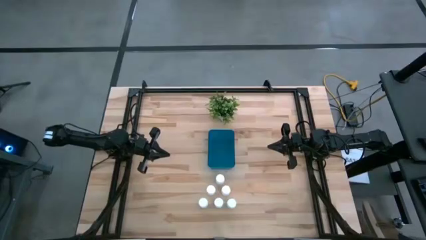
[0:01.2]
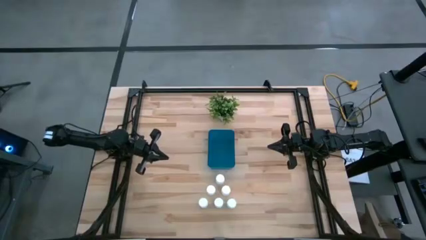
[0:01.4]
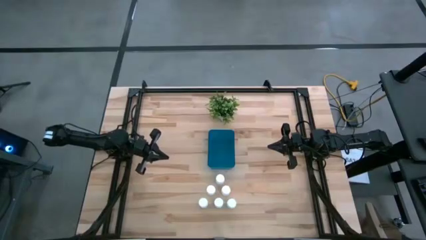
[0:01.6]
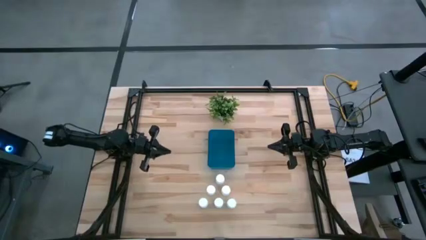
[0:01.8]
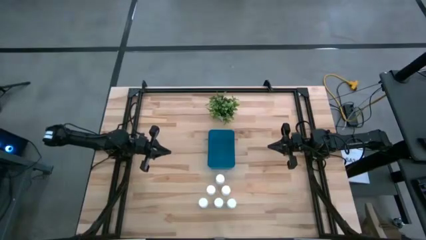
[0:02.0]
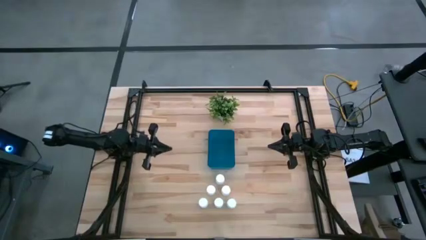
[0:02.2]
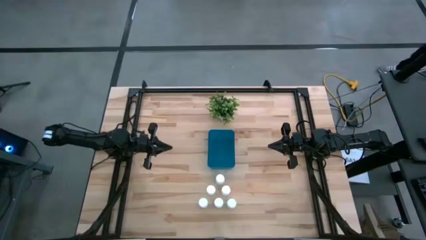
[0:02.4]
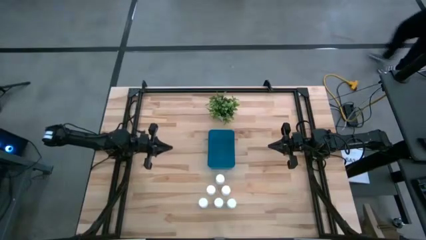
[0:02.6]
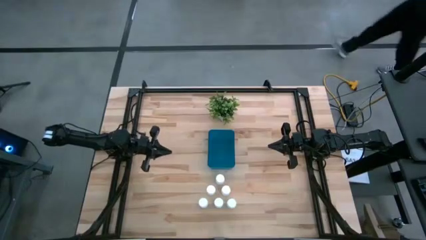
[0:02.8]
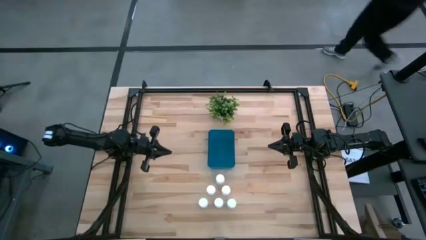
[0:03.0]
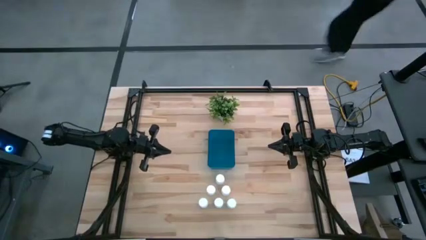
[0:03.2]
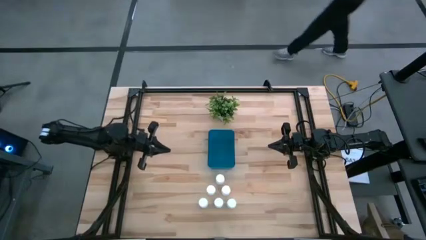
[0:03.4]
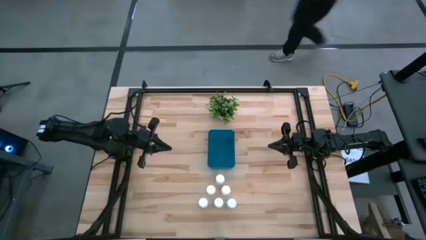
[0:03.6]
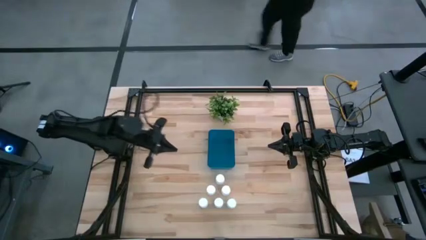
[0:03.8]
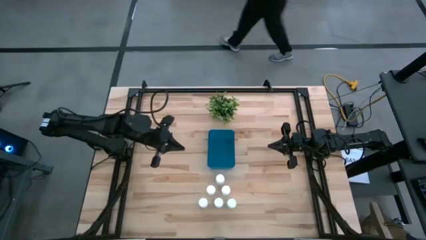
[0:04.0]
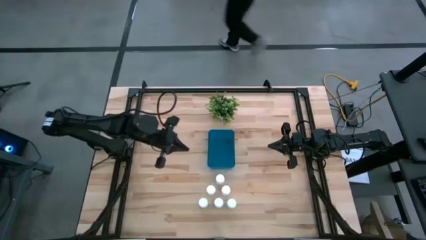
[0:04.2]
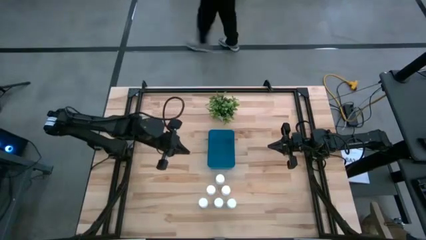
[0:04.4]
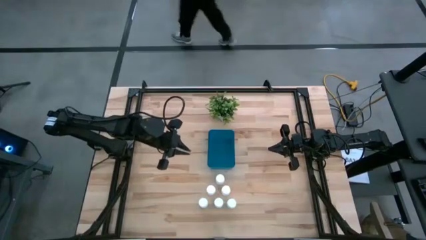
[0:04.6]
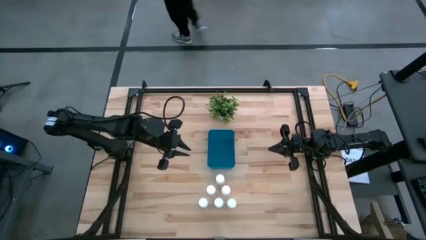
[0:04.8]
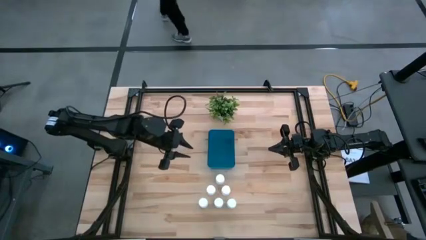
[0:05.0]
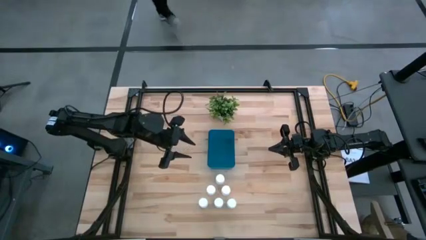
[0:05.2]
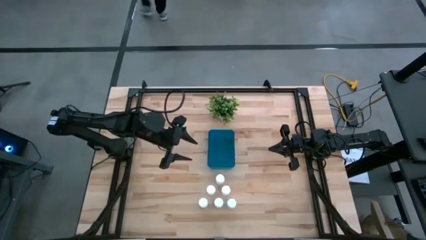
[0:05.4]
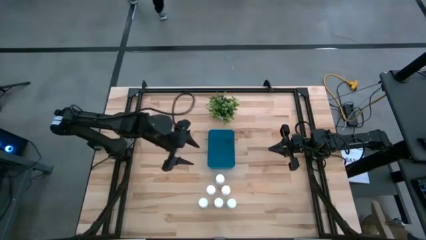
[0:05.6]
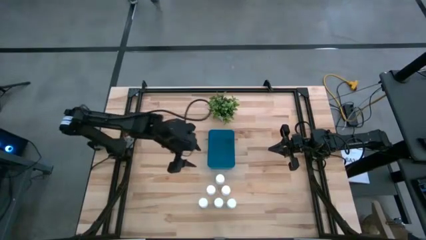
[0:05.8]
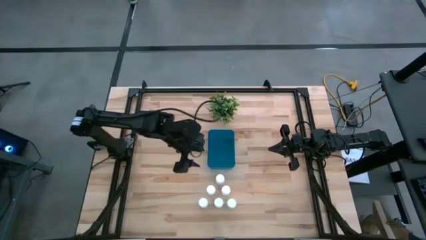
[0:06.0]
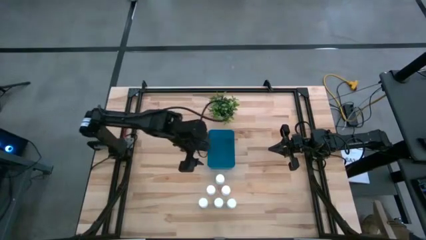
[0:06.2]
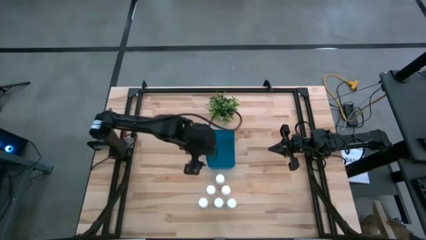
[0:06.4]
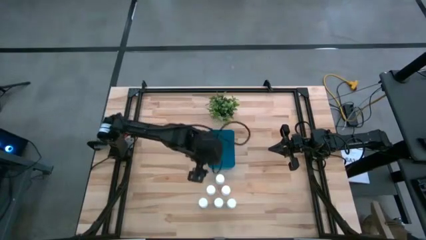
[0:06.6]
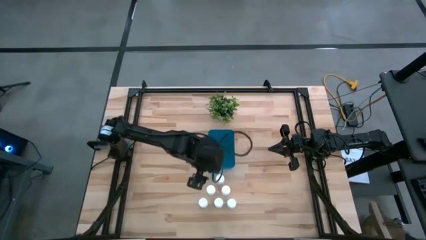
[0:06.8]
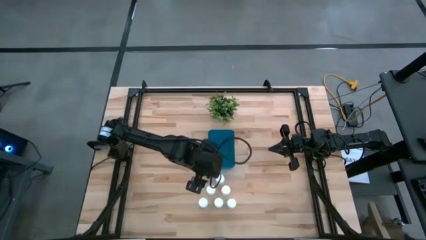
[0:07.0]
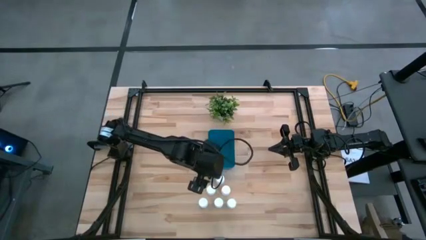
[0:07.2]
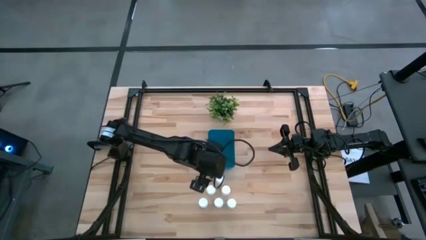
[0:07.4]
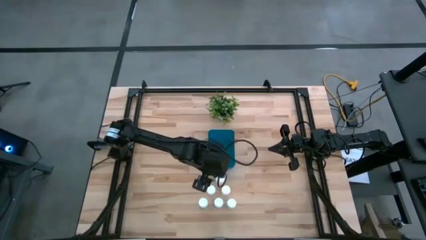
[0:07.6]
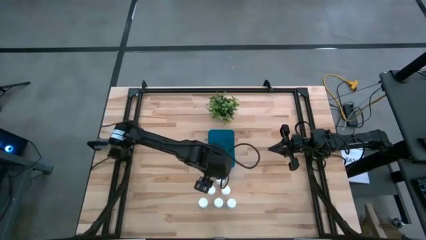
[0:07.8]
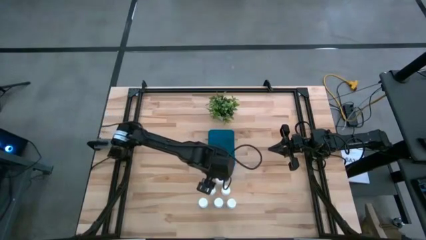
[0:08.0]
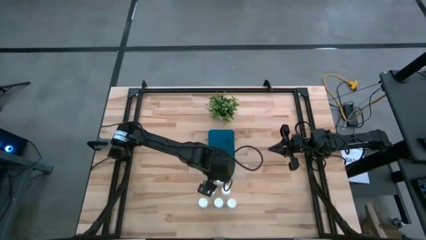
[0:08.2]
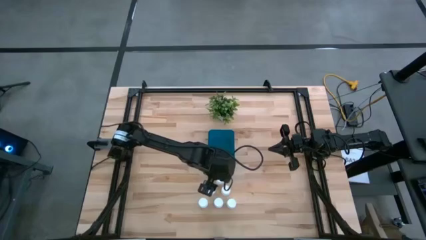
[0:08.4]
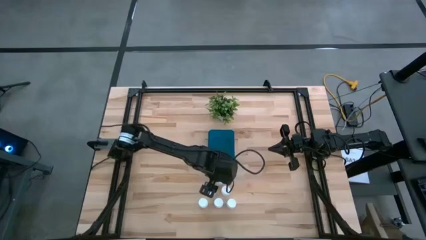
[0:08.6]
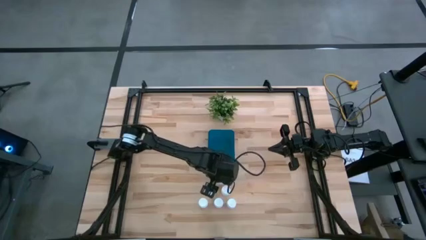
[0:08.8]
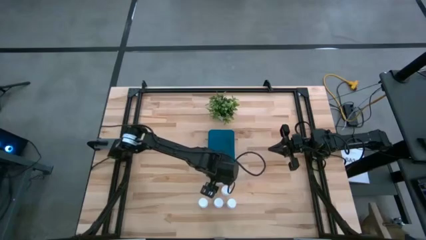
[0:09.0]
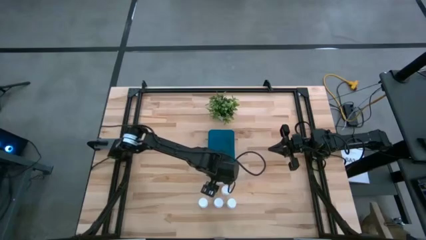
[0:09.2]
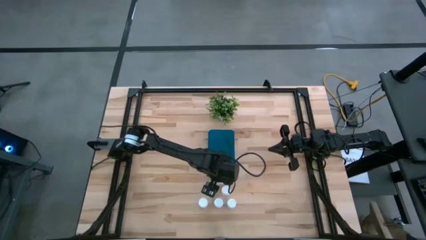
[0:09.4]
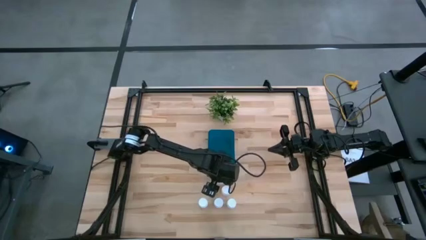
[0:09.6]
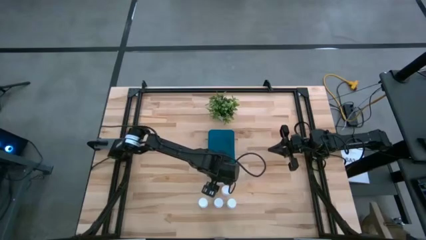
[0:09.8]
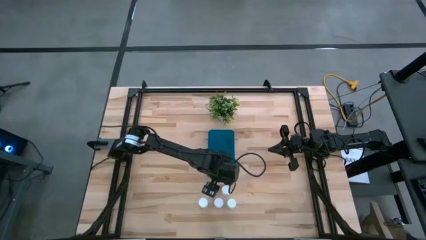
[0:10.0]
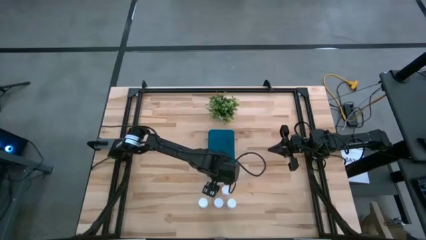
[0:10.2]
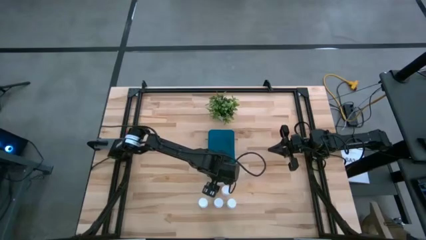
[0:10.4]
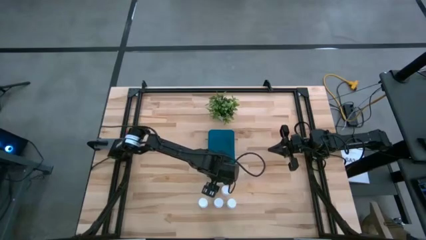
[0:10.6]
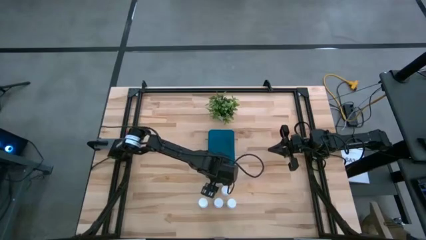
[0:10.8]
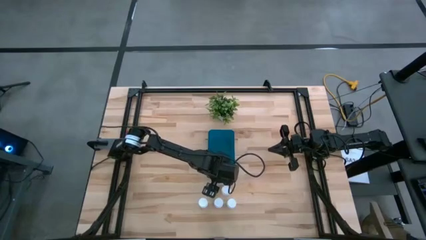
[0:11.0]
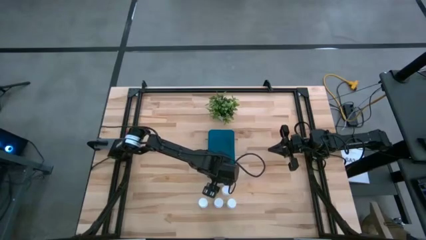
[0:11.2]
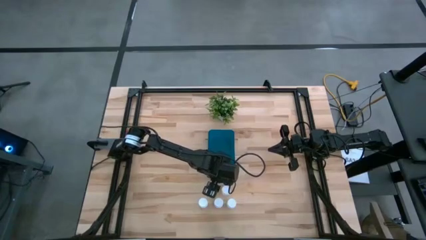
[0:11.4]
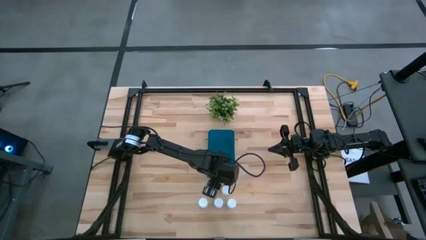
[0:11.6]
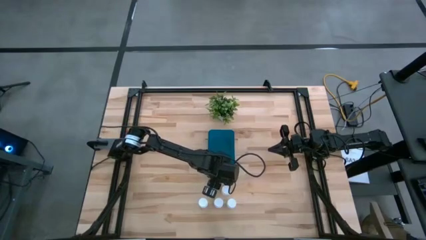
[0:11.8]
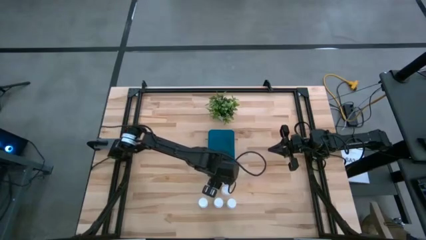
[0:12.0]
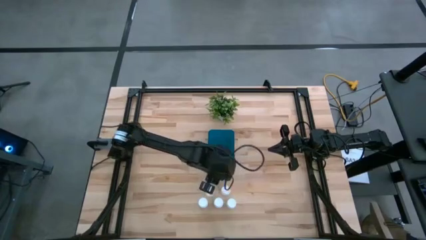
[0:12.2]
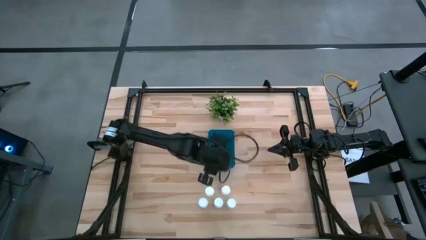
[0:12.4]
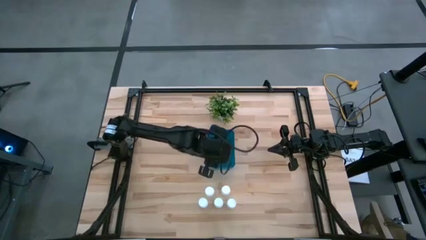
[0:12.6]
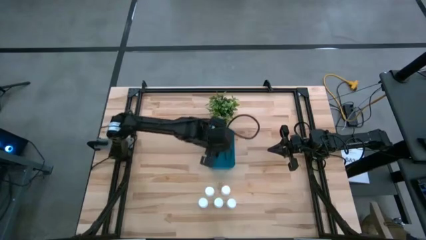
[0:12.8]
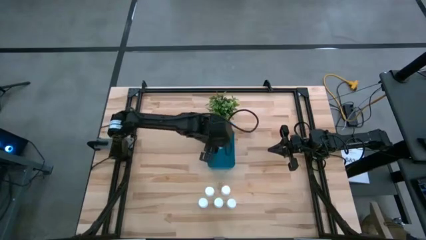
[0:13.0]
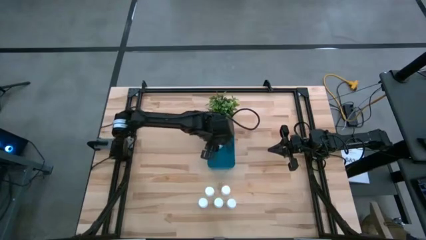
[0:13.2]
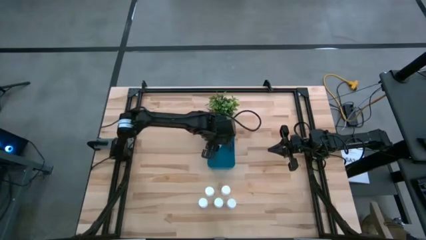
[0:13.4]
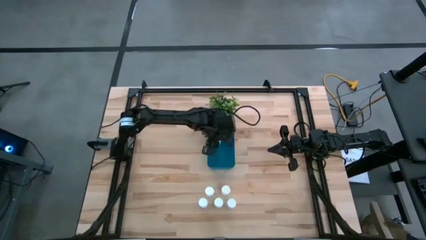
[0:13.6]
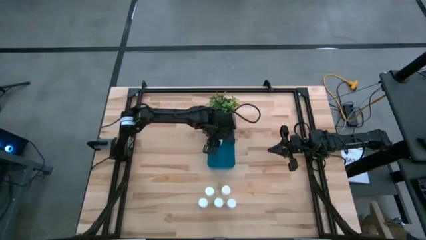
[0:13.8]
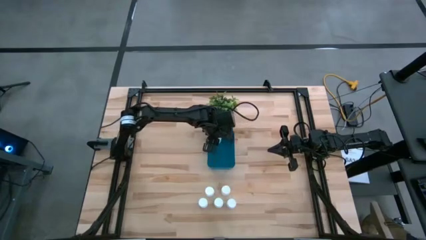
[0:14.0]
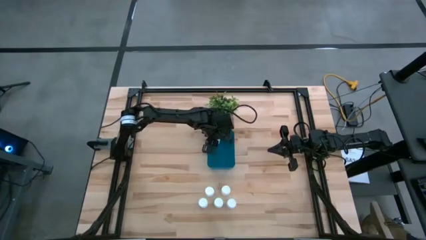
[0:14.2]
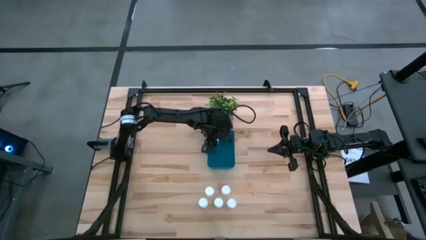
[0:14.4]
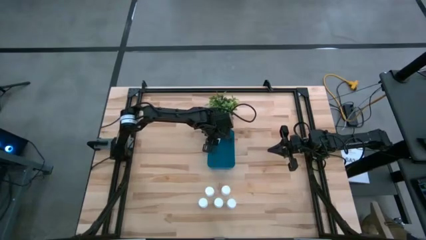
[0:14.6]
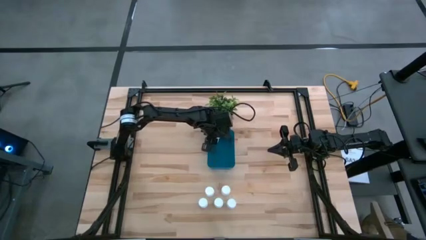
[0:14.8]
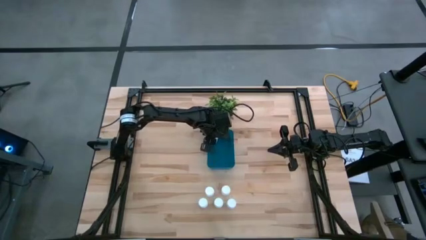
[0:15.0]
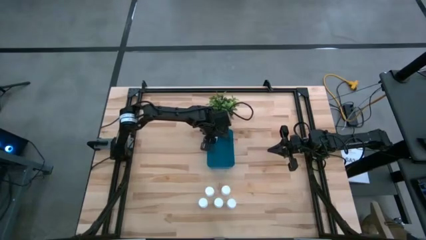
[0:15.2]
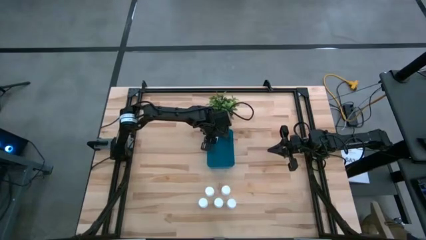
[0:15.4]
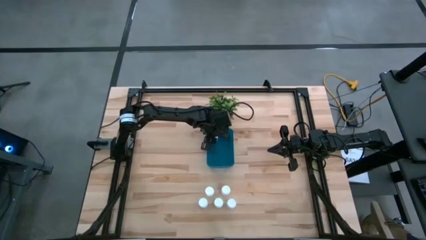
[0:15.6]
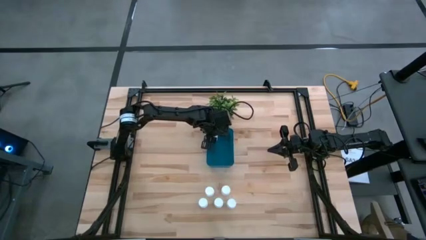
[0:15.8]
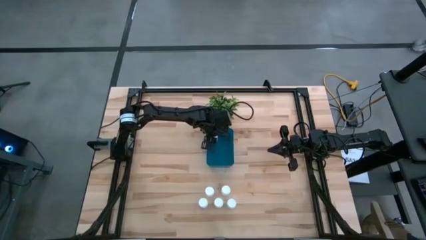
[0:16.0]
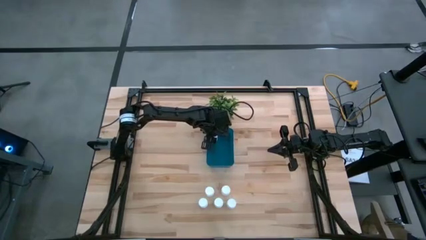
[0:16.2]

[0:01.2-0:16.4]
Task: Pick and place pill bottles into a basket
Put the white pill bottle into the blue bin
